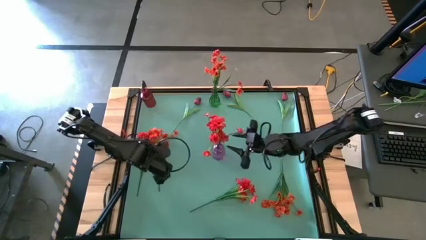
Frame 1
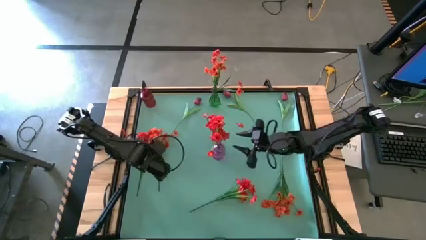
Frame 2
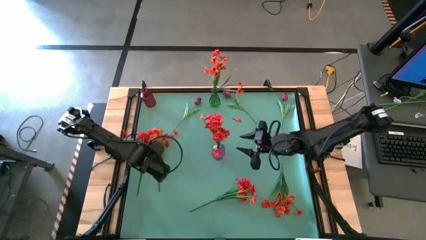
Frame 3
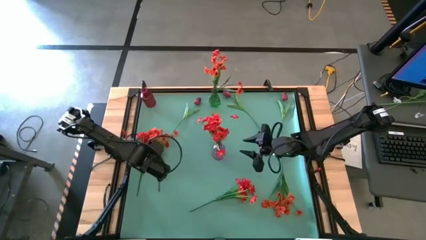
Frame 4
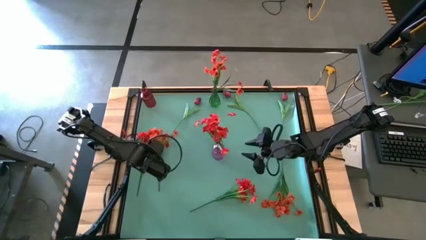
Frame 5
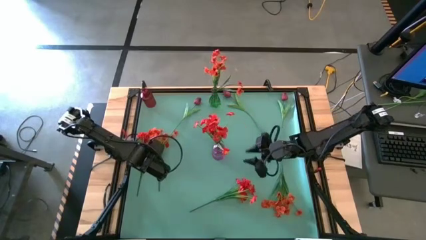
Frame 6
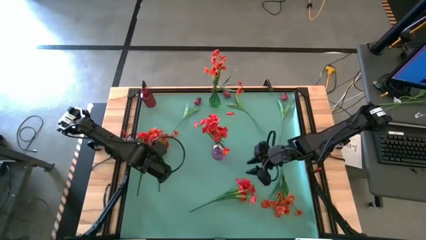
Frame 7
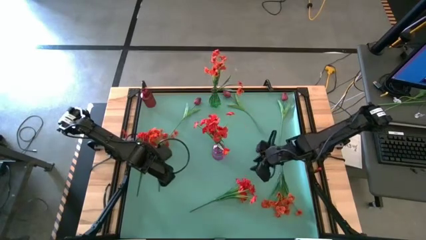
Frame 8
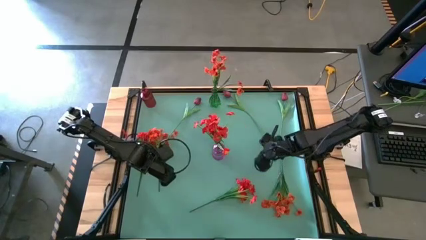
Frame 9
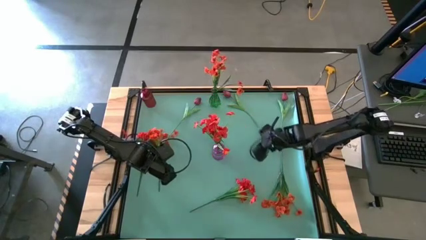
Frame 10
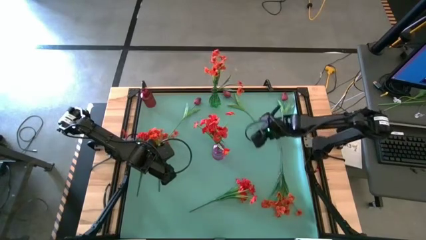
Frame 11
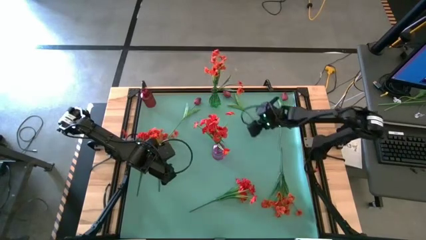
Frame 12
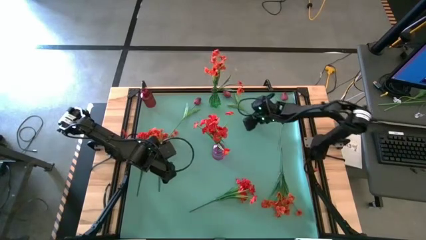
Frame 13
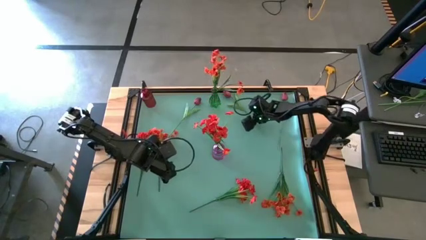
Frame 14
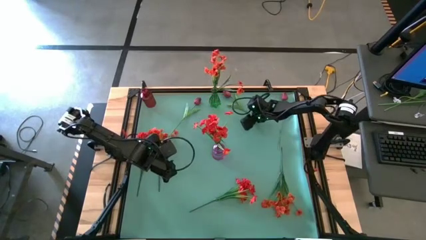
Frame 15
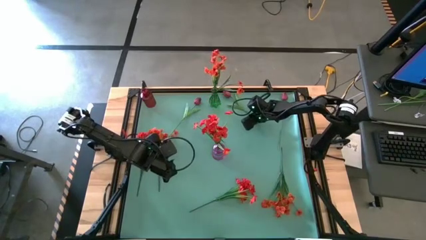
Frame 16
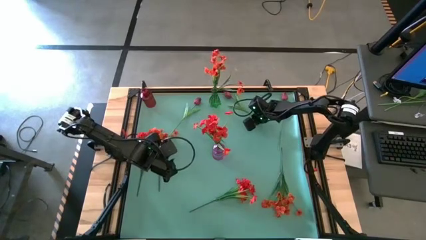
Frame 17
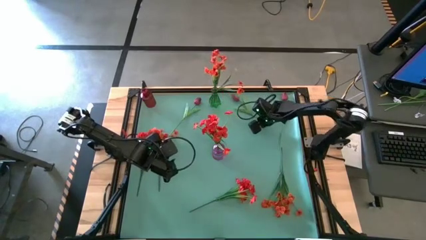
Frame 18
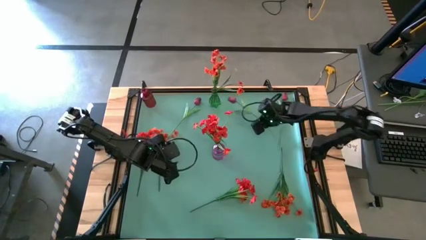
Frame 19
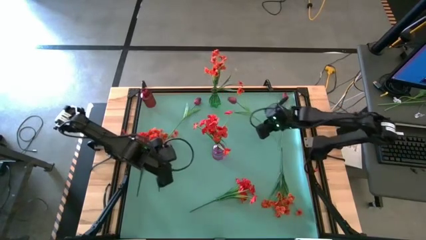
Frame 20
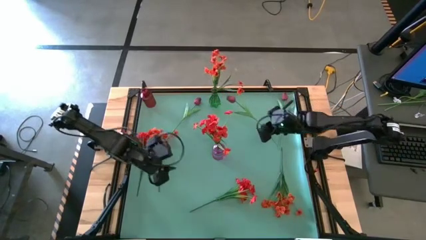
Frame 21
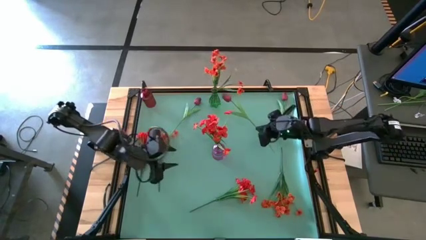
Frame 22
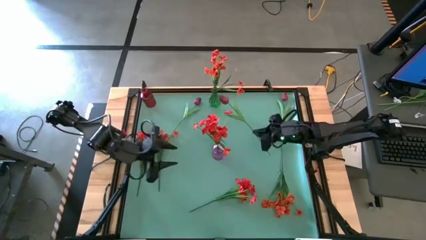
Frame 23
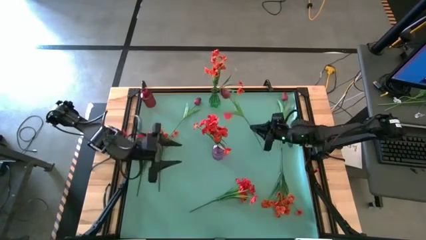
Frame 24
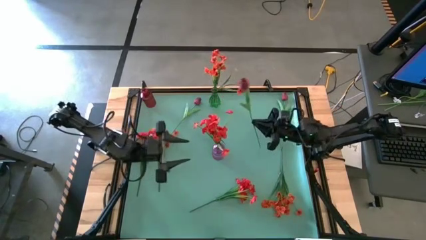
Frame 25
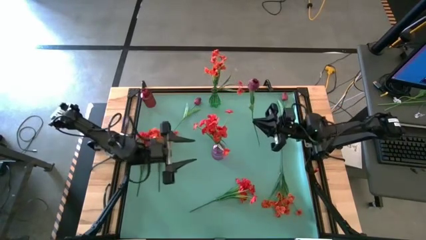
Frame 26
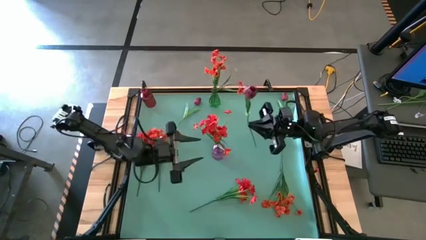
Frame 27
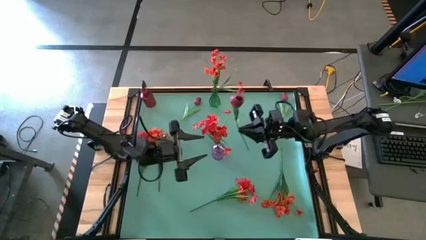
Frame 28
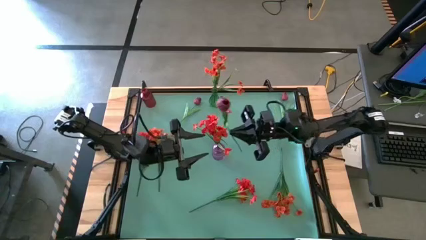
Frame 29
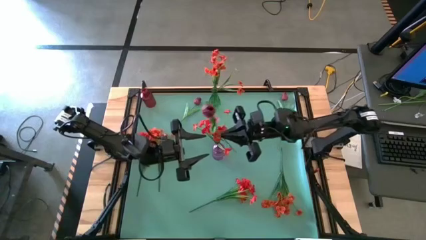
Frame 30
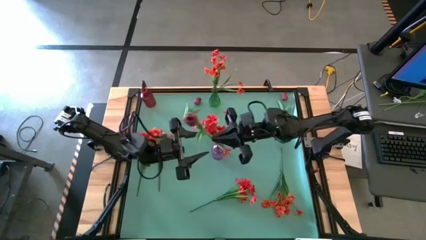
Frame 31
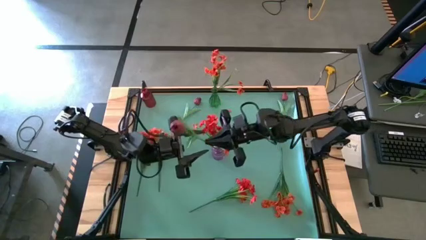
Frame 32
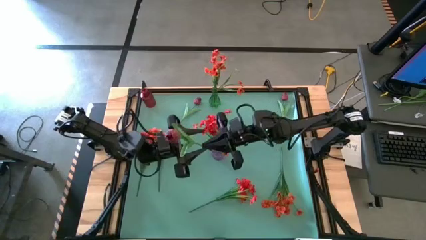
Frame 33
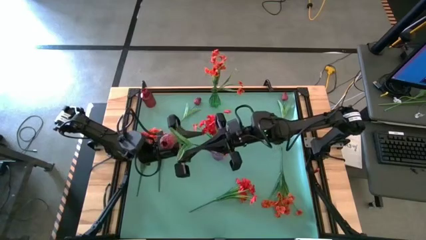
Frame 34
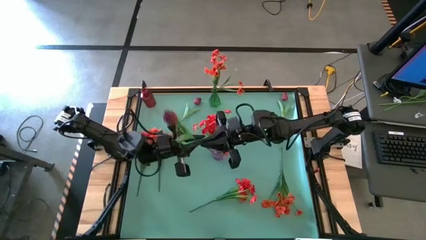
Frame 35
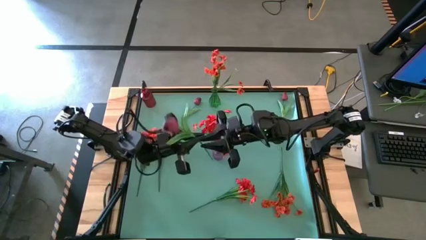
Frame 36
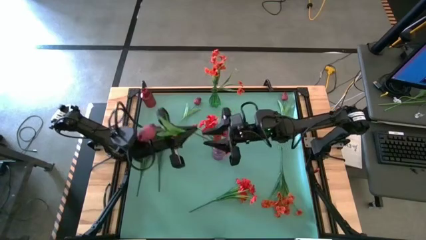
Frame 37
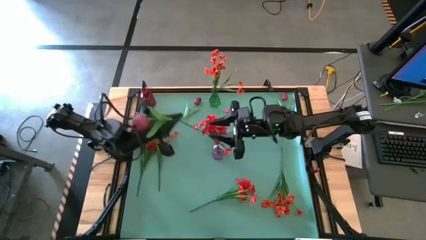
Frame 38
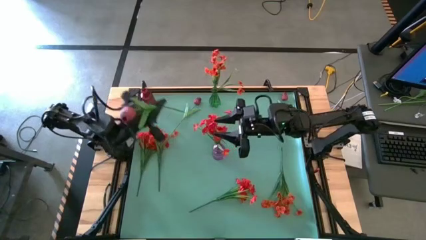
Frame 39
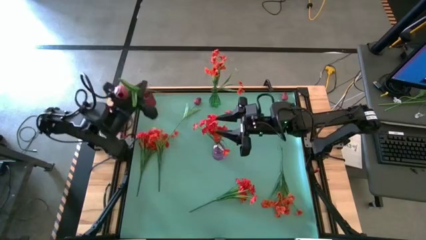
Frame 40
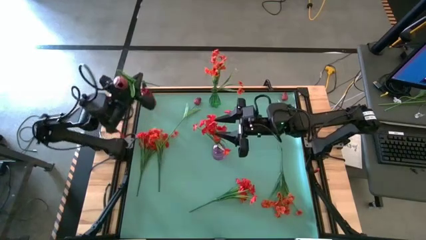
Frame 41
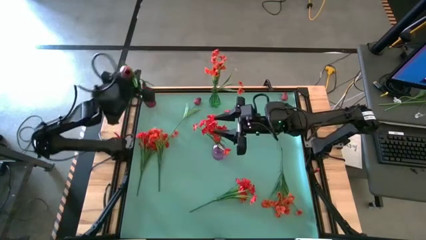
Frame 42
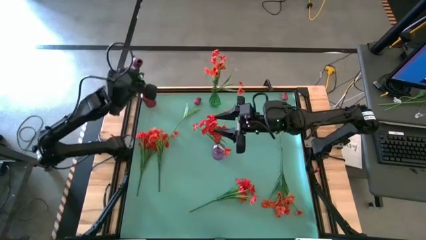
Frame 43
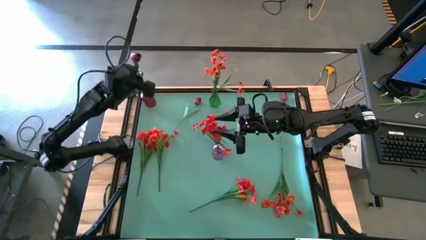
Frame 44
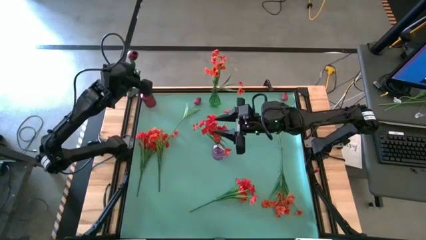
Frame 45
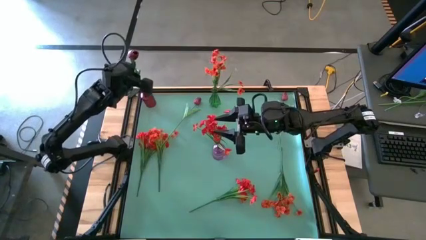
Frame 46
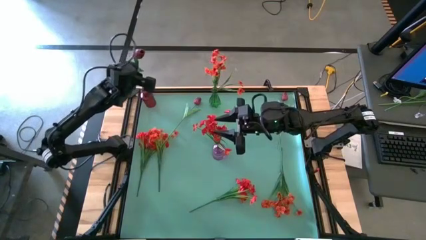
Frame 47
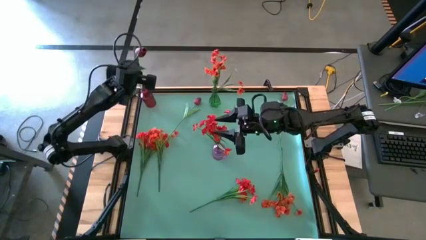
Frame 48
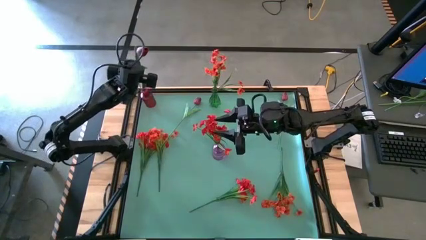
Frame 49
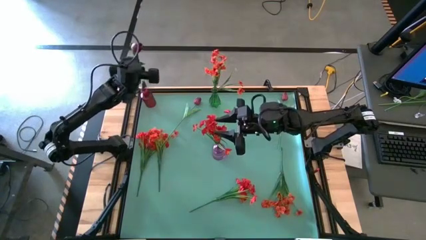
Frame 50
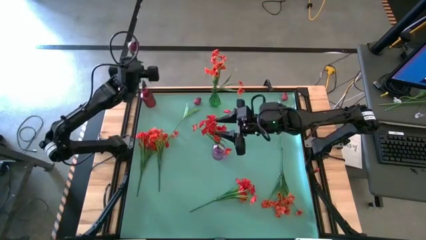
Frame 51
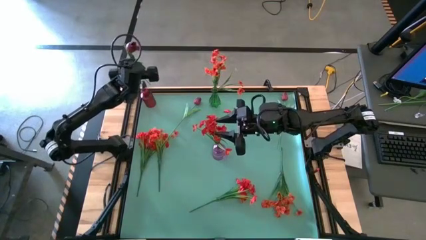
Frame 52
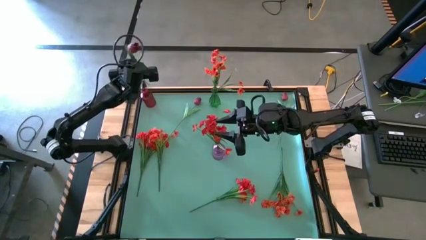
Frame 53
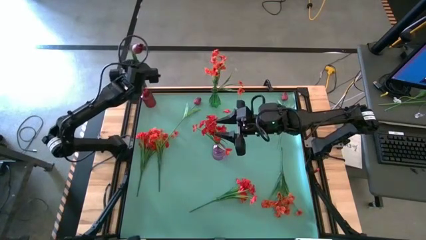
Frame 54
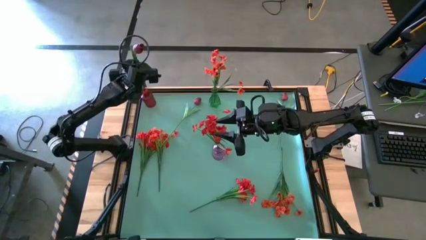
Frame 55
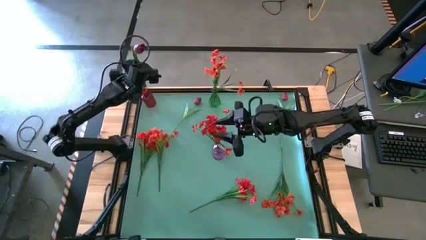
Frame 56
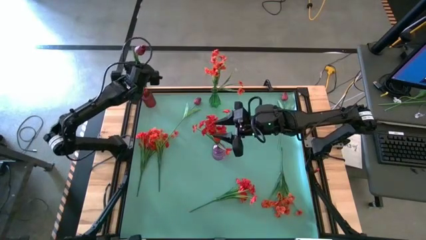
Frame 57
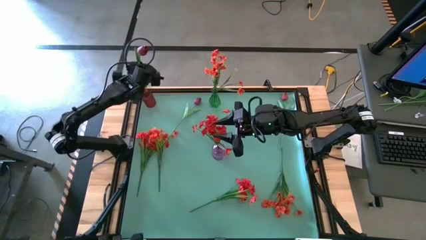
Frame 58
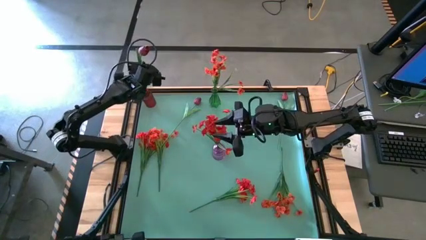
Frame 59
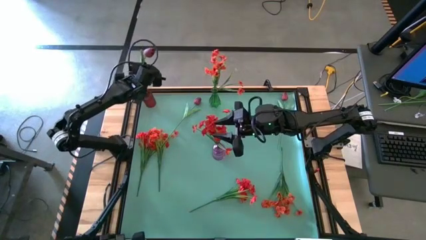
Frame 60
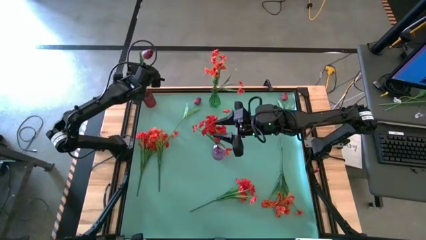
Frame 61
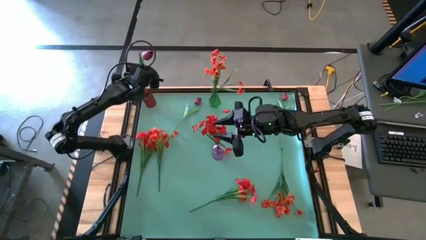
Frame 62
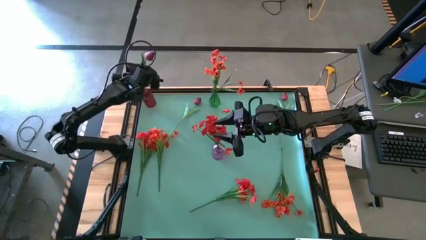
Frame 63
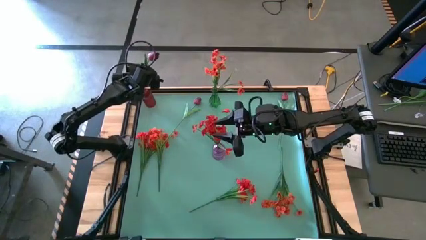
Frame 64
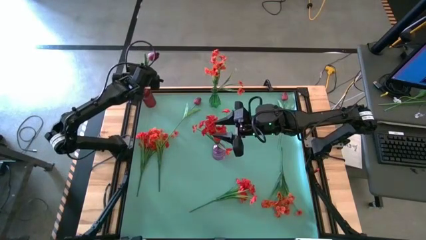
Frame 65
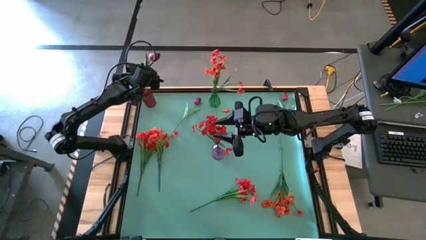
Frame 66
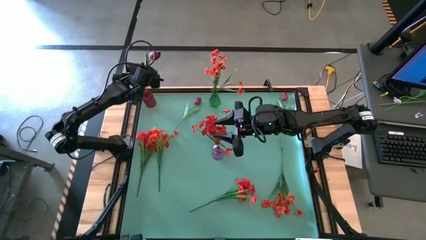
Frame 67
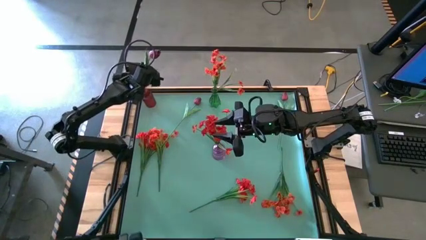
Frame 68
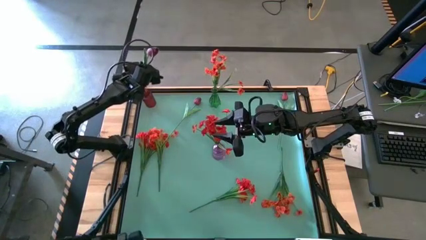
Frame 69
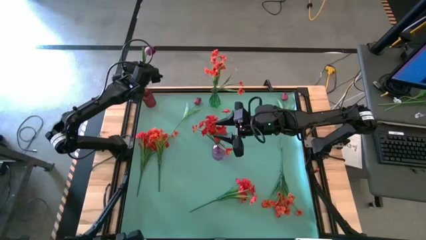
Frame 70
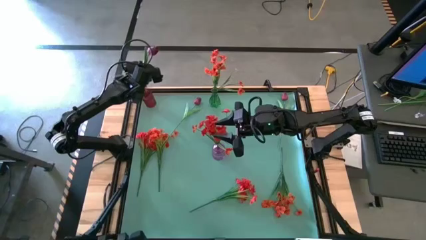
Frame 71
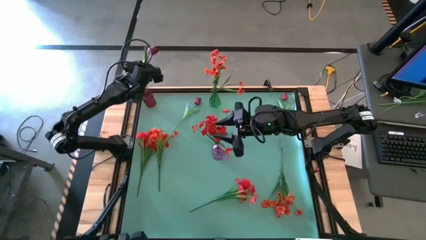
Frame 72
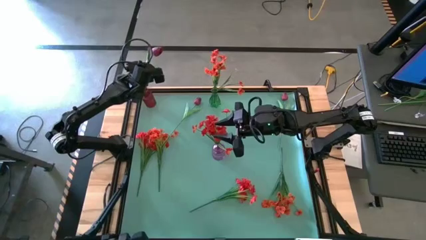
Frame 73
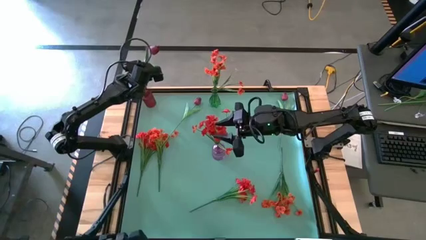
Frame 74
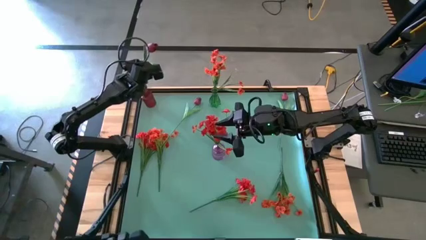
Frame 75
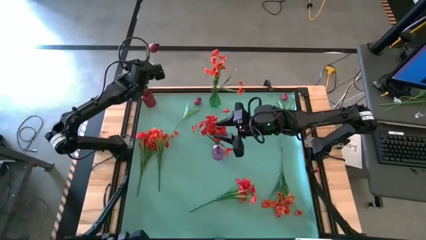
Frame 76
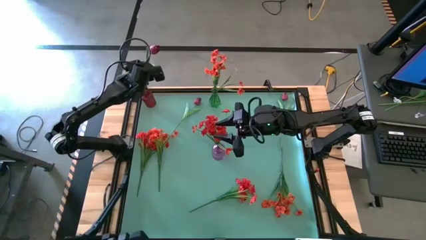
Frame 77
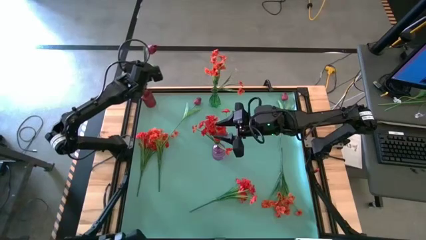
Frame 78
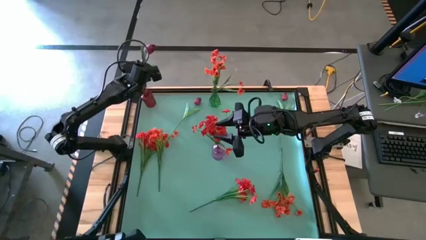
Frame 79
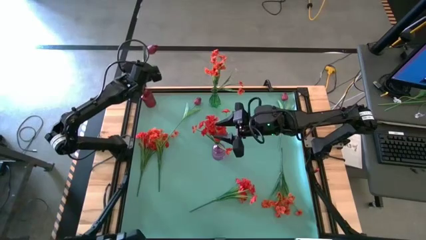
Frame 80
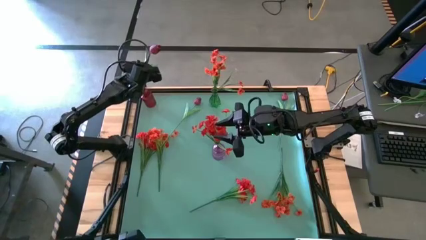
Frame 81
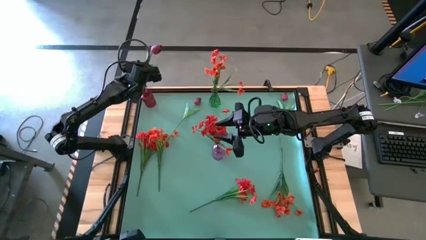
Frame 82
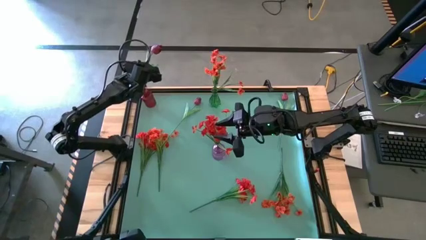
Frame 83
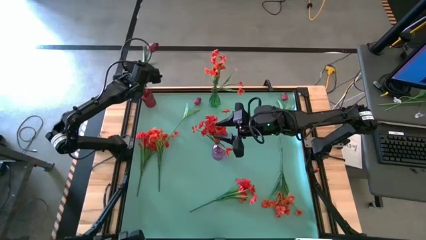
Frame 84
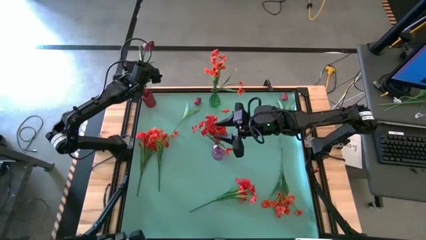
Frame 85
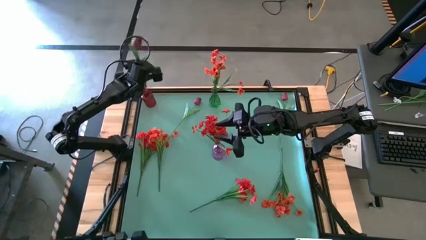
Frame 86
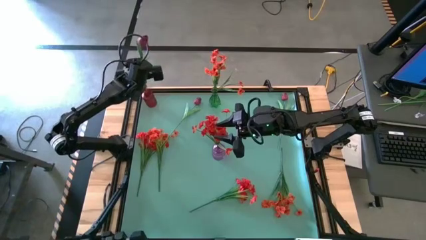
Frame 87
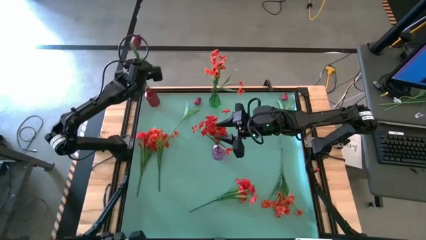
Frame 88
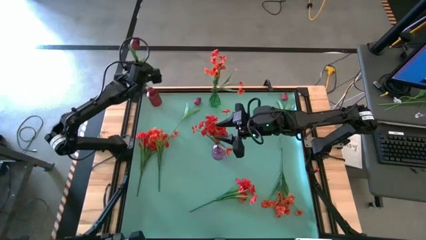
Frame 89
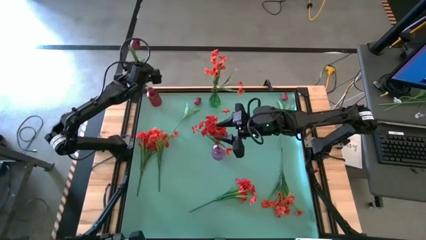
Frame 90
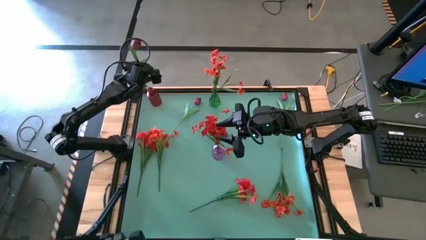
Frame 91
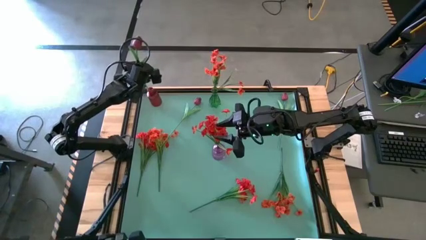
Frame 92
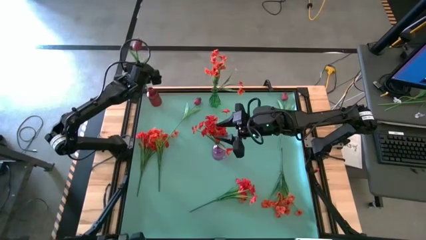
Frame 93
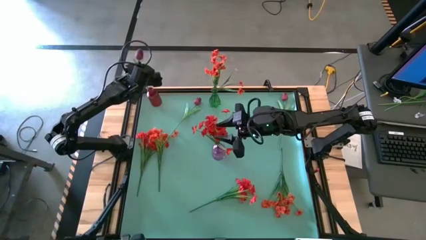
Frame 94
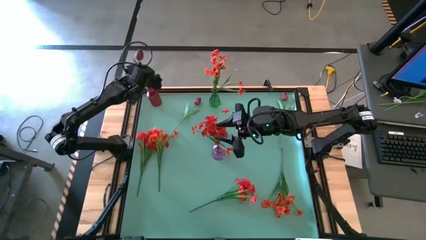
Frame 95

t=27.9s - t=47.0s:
Task: Sort flowers into vase by color
Put the center pink flower into the red vase
